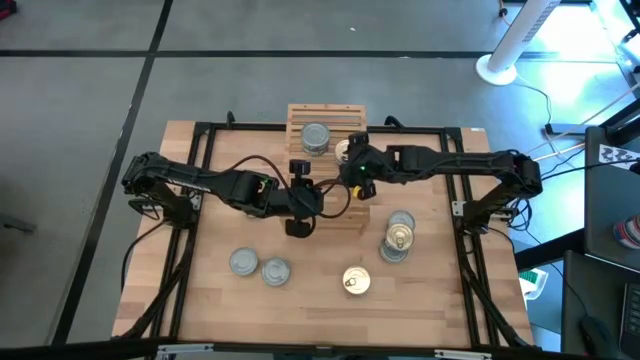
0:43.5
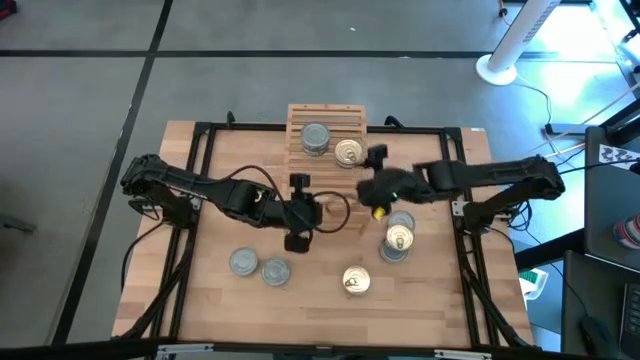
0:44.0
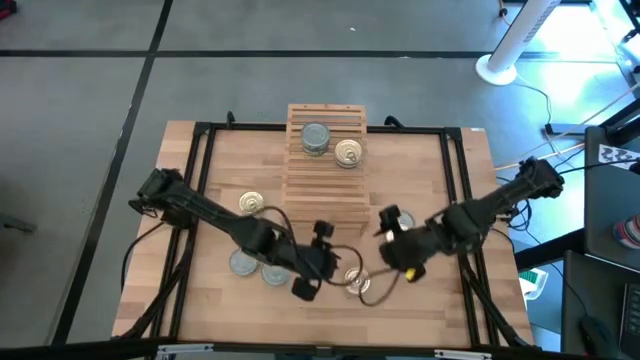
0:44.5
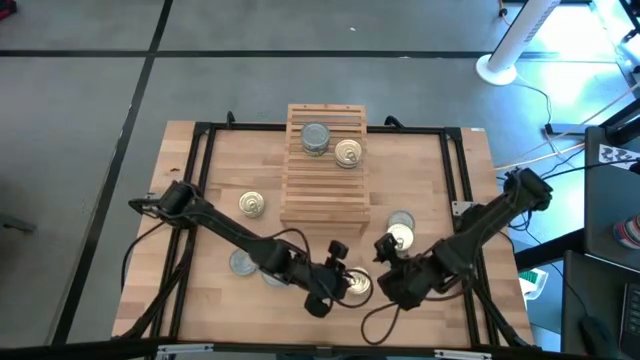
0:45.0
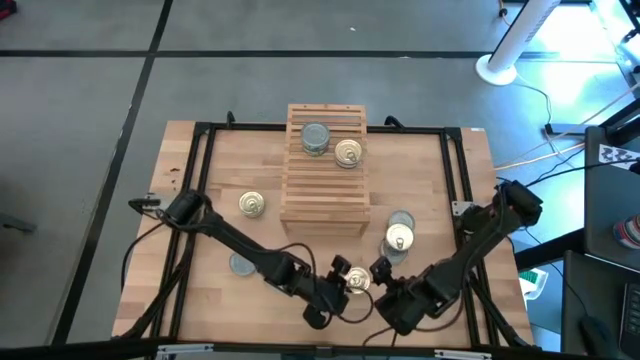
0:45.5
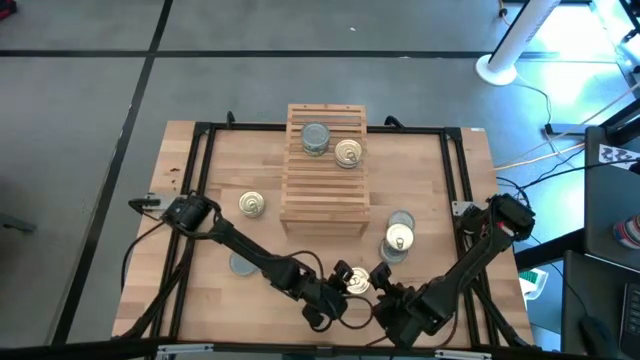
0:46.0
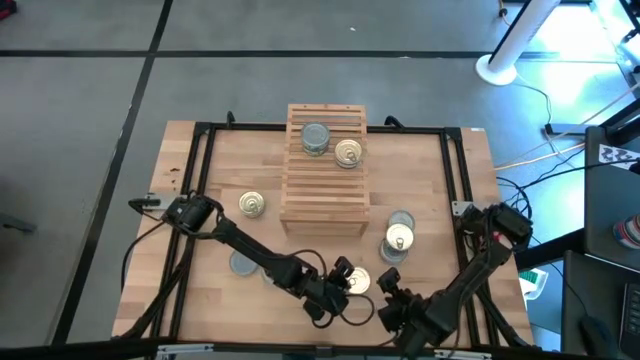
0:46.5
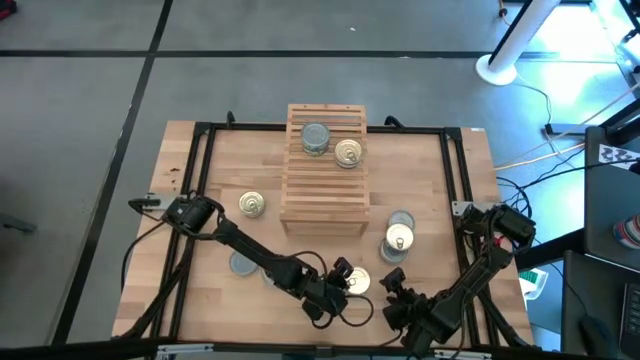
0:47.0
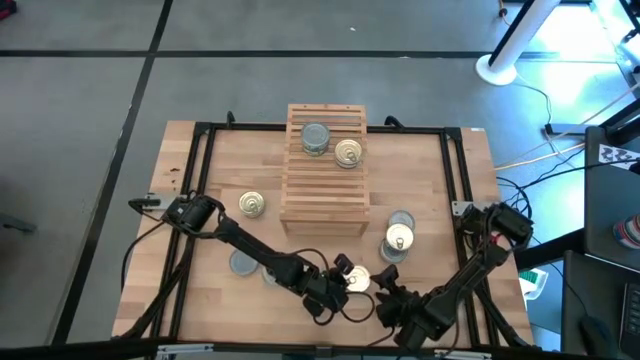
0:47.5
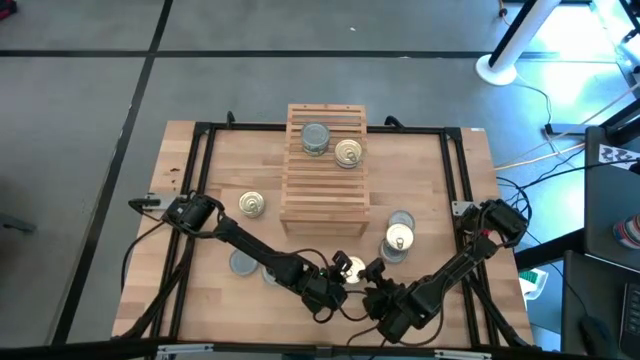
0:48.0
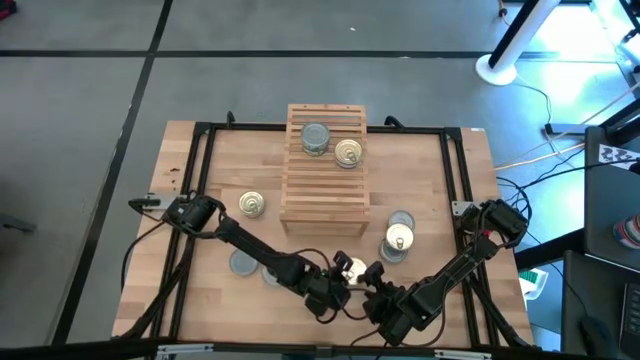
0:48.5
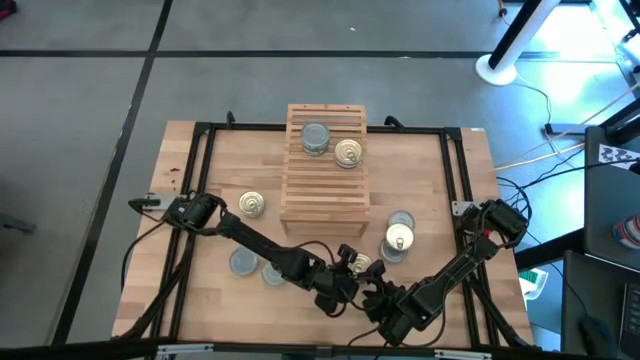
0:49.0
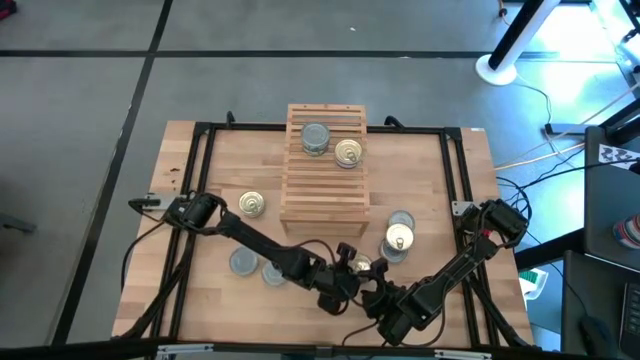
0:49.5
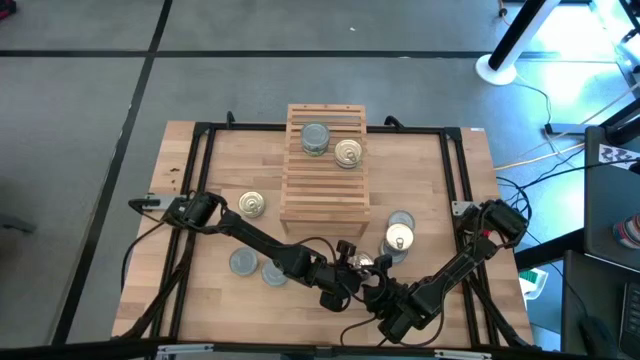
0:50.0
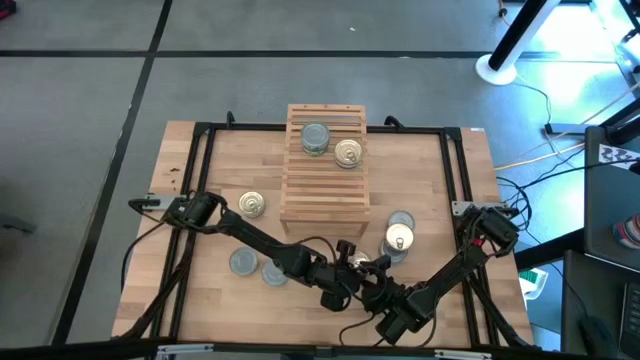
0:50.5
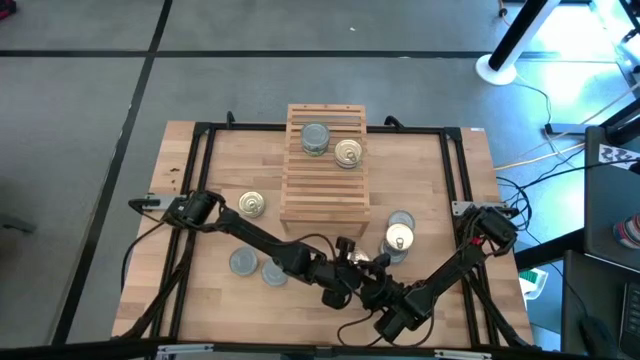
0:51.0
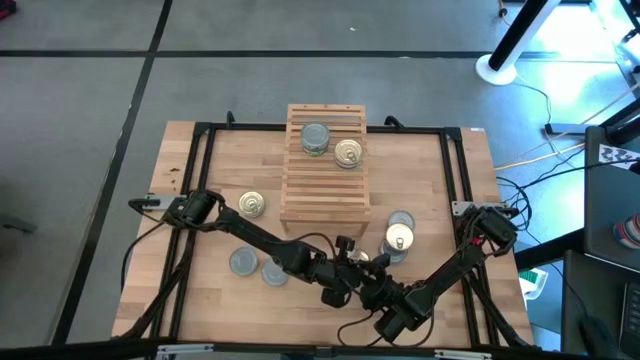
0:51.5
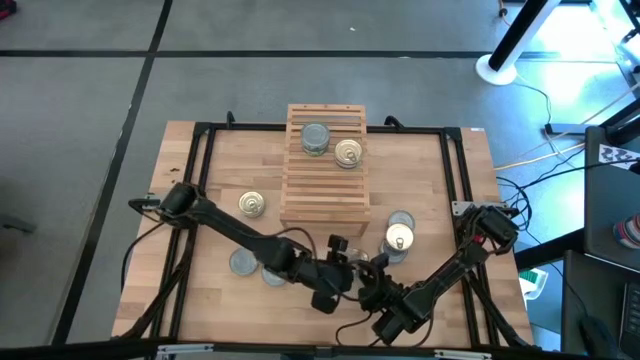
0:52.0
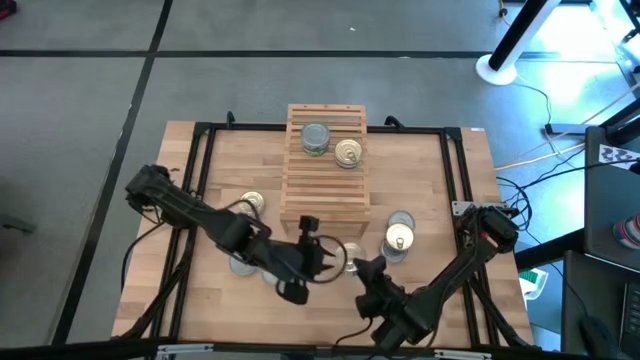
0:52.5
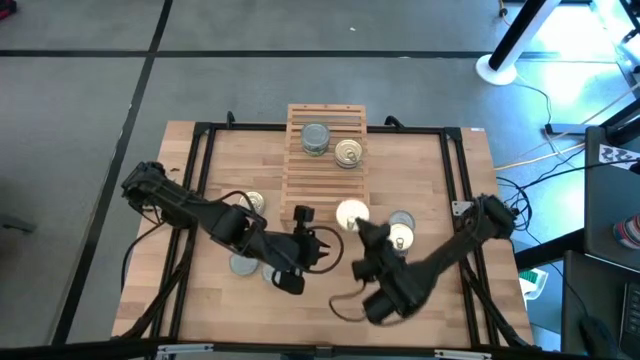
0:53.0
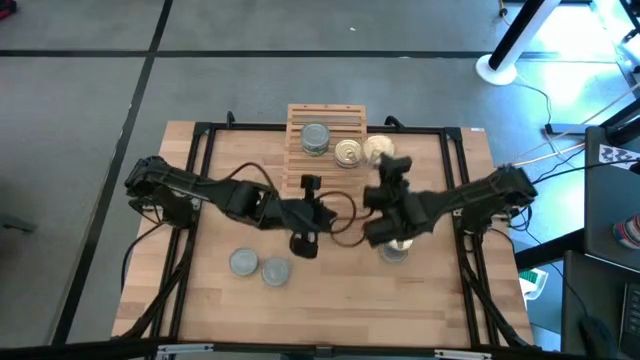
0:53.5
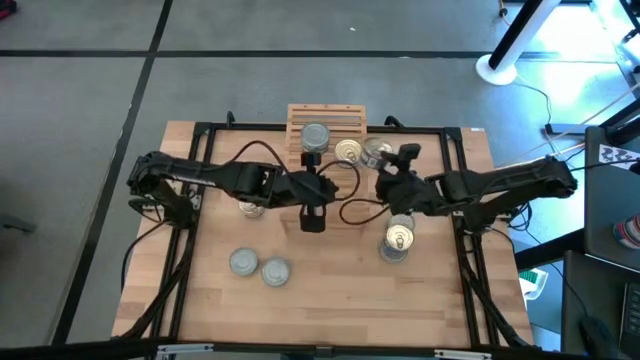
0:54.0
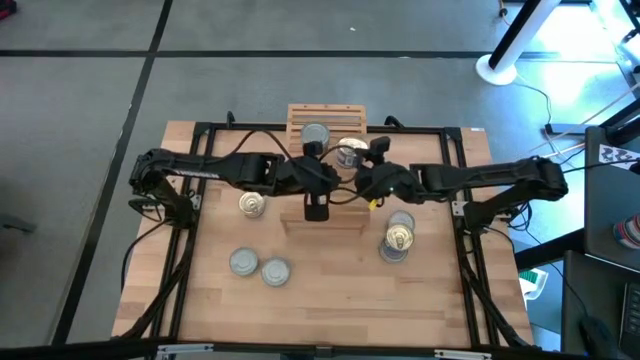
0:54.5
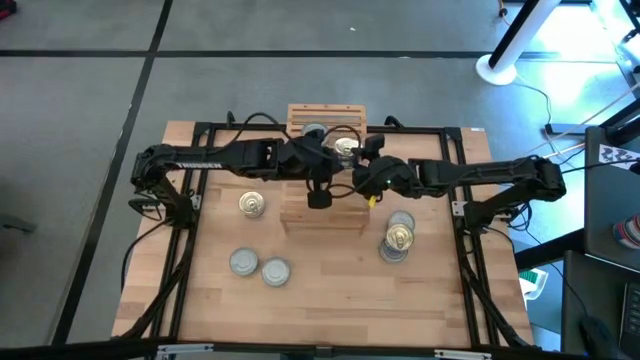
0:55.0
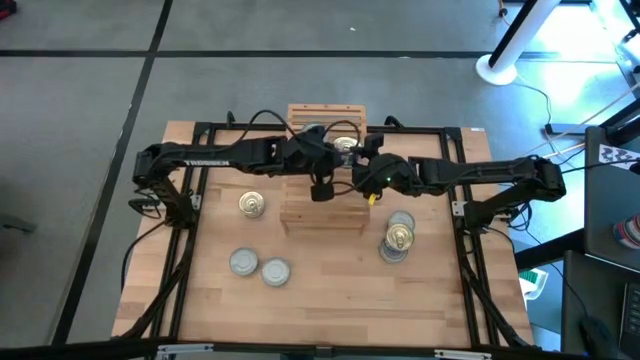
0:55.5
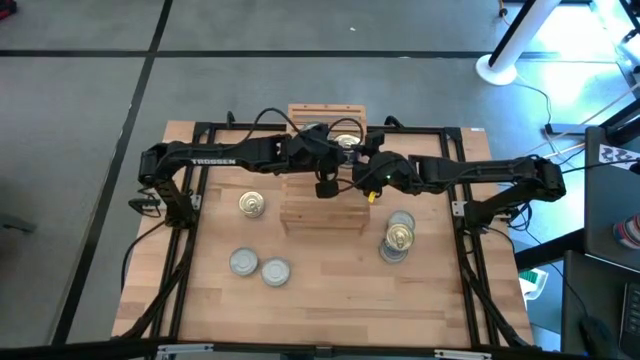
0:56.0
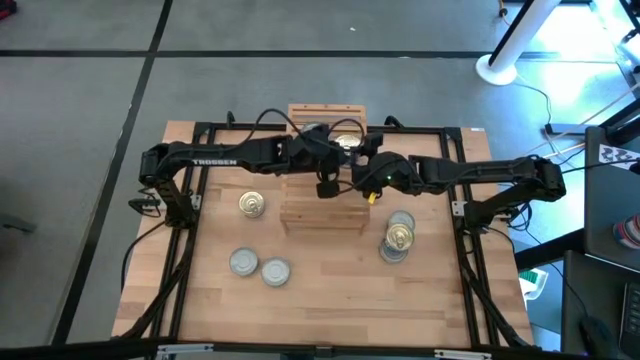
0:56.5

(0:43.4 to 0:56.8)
Task: Stack canned seafood by type on shelf
Stack the blue tuna can on top of the blue tuna can on the shelf

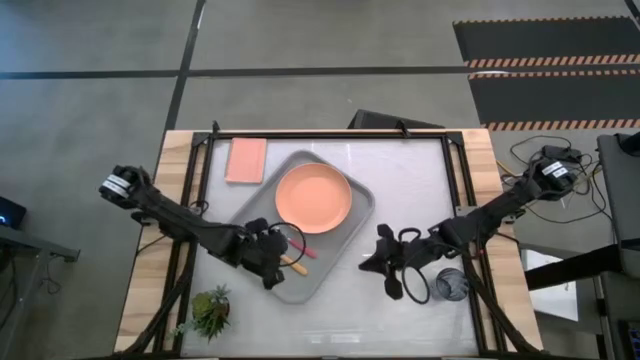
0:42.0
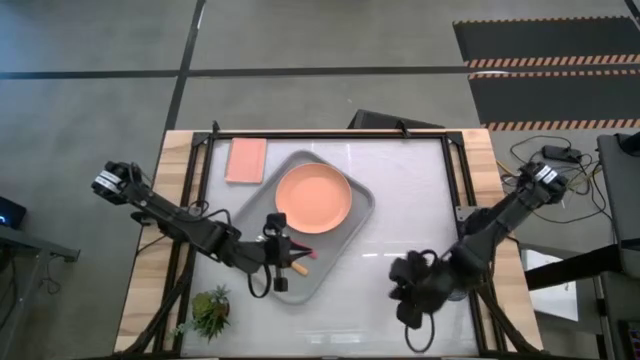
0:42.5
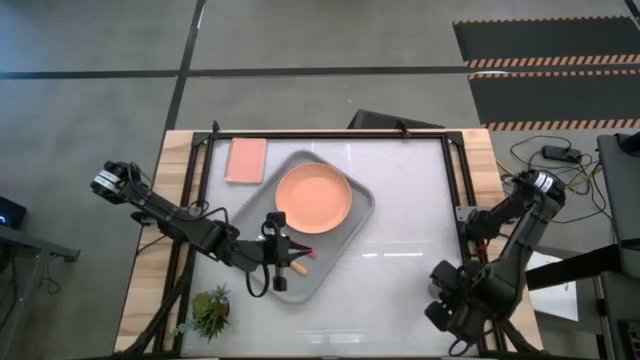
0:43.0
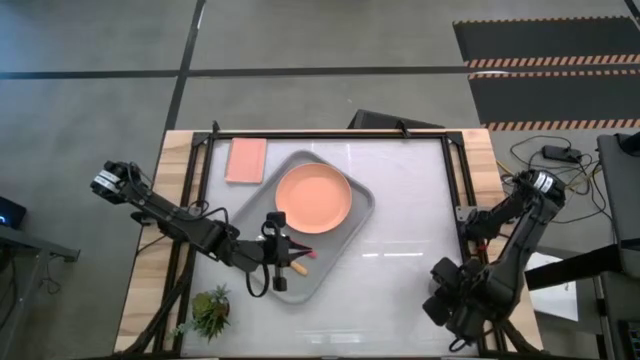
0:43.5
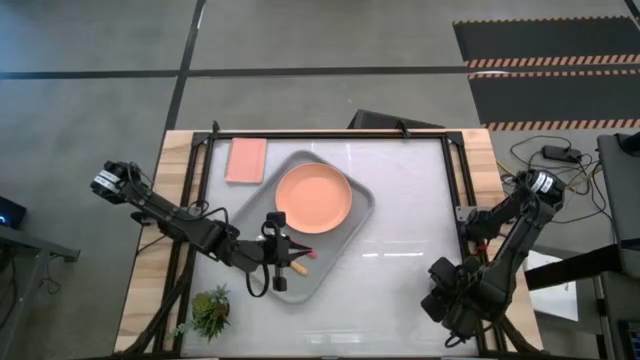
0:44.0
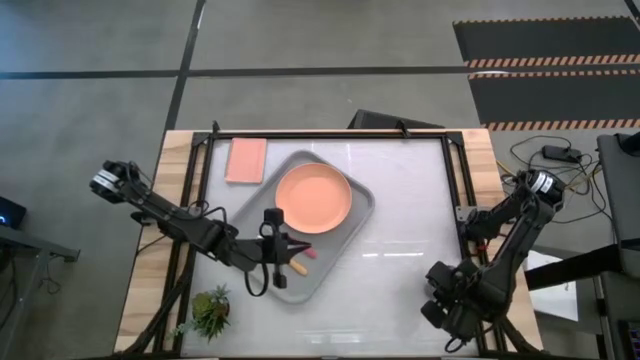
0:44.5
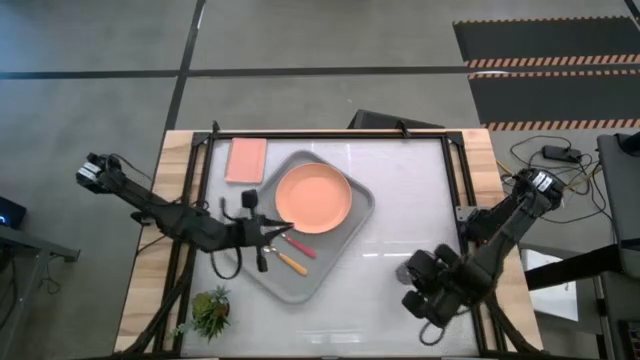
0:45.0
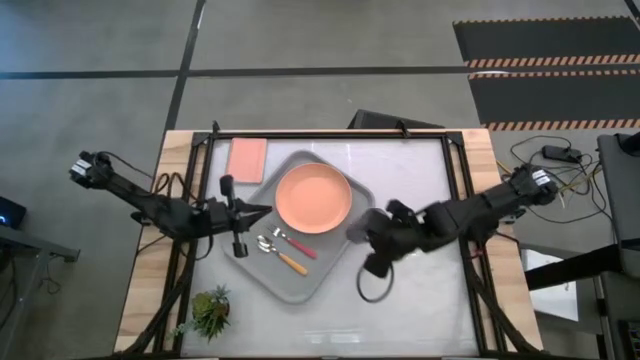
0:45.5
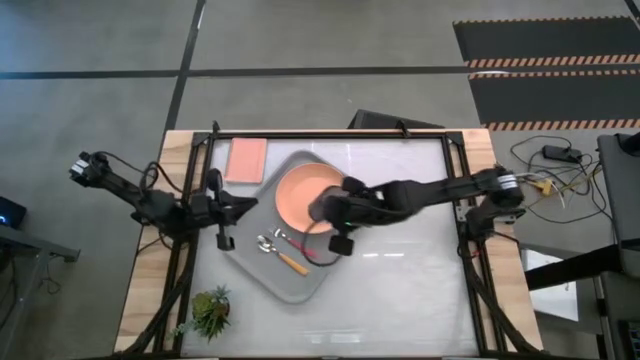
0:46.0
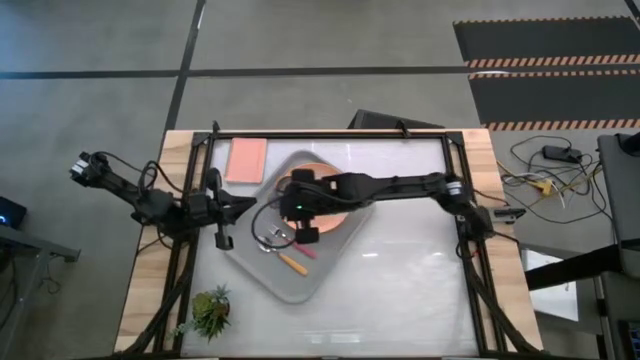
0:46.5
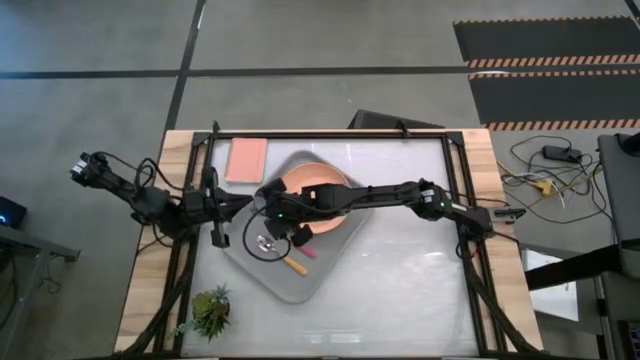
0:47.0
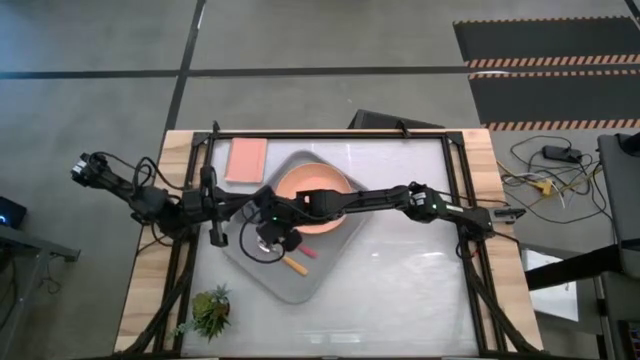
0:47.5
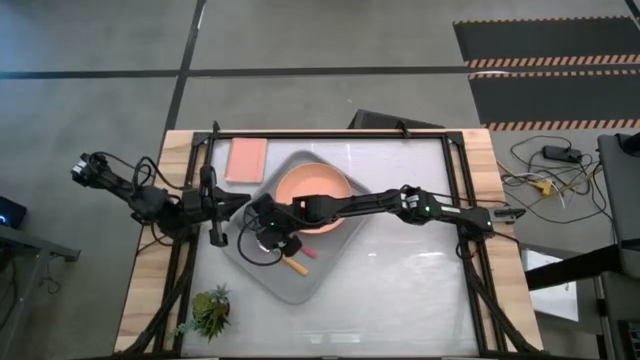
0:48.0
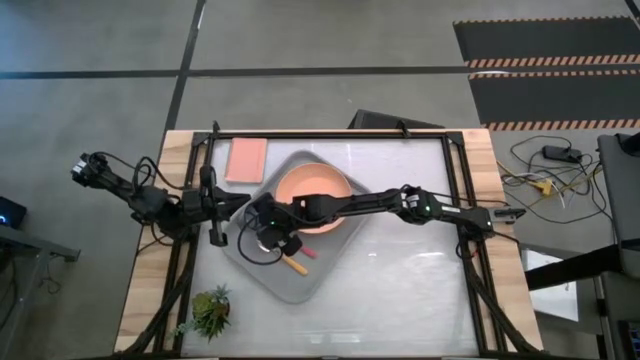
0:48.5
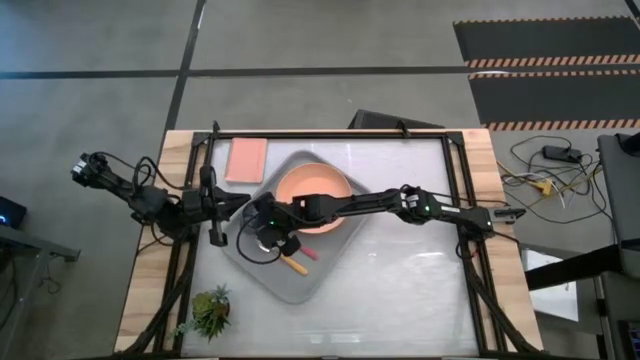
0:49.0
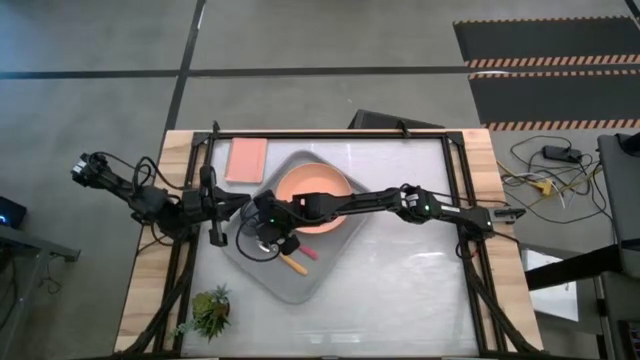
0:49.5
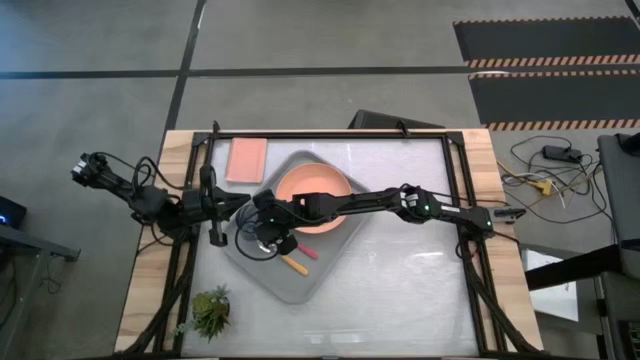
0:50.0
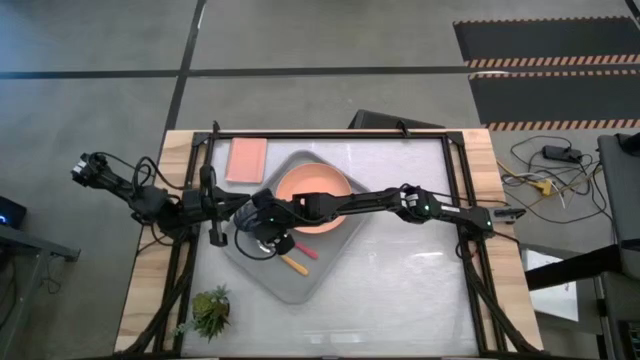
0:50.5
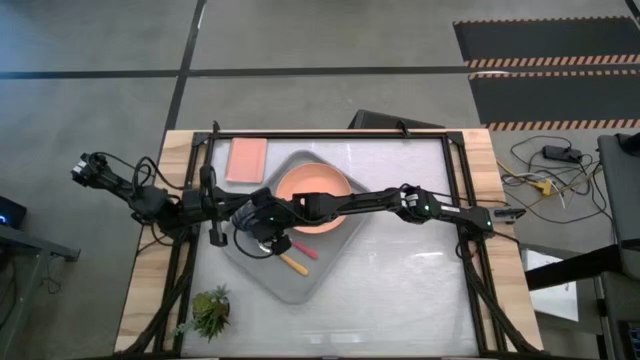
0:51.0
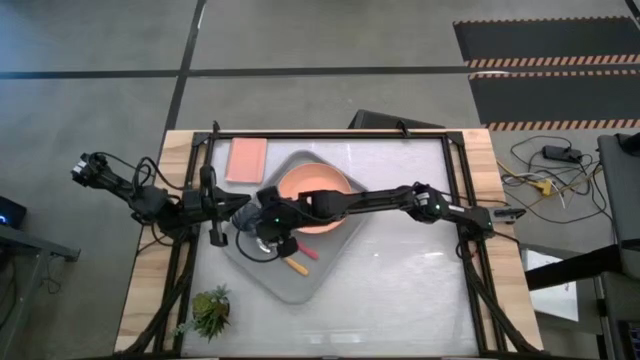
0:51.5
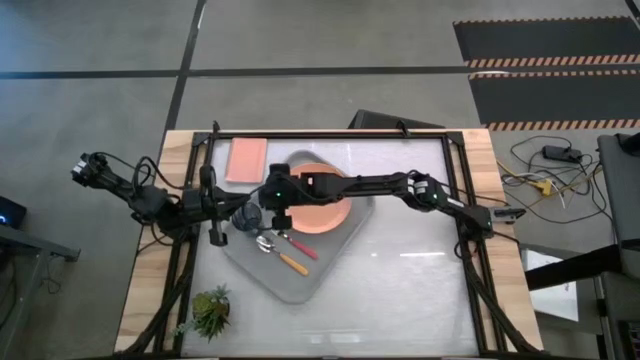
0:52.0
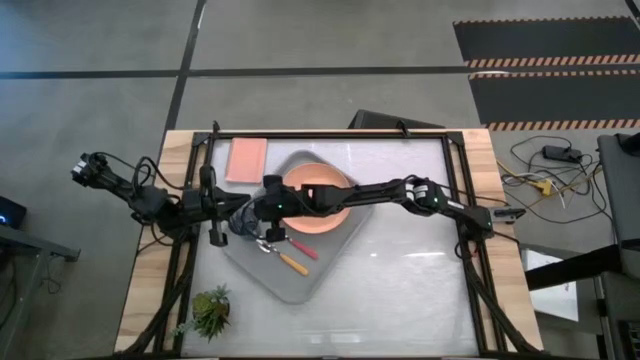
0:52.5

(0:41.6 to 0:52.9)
Task: Pick and place plate/cup/fork/spoon on tray
Put the blue glass on the gray serving tray to the top left of the orange plate
